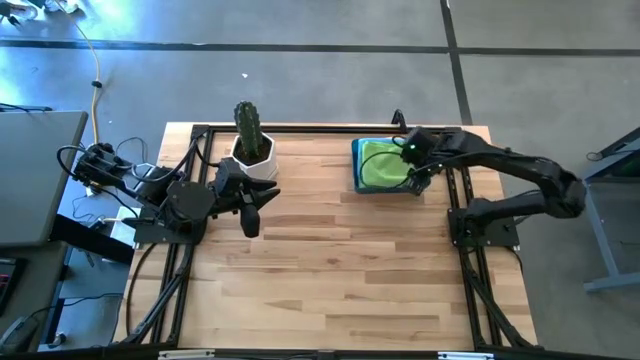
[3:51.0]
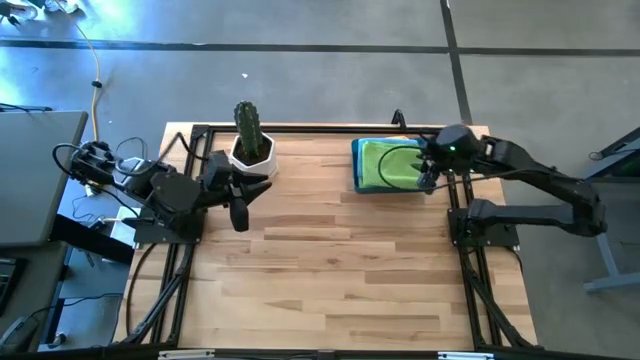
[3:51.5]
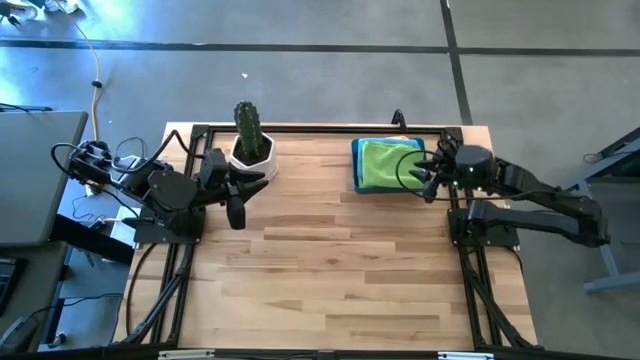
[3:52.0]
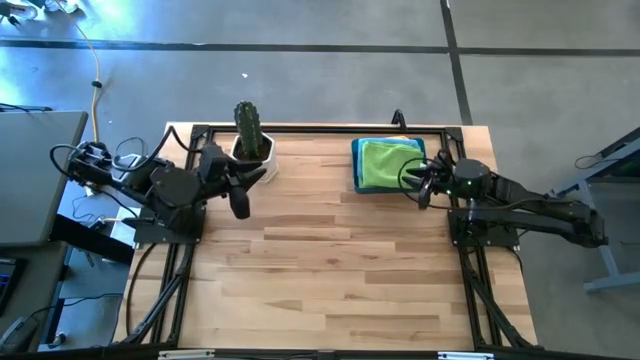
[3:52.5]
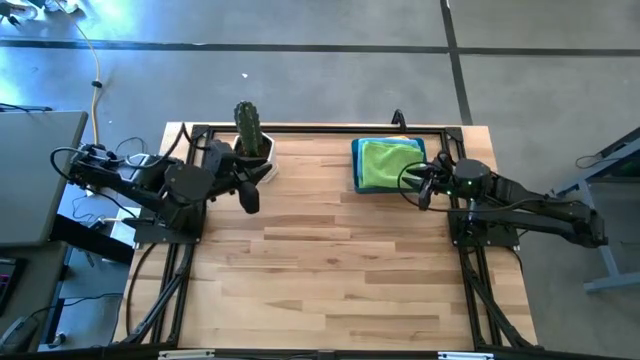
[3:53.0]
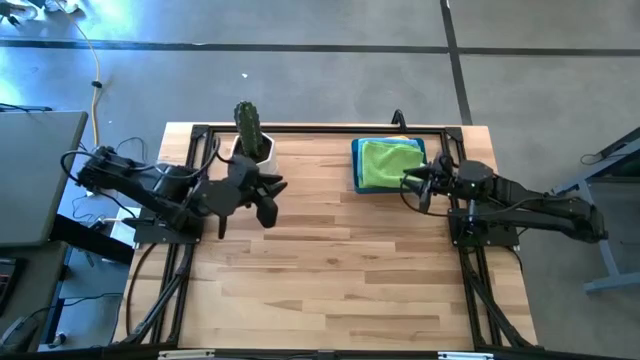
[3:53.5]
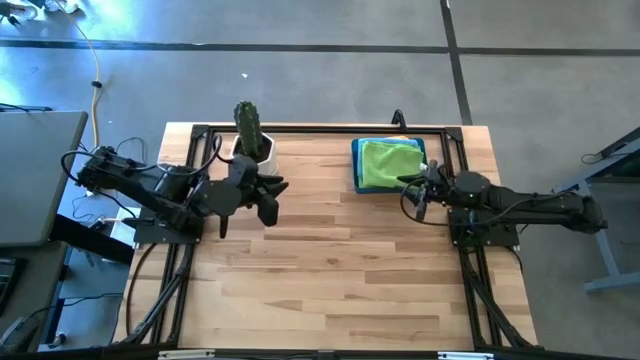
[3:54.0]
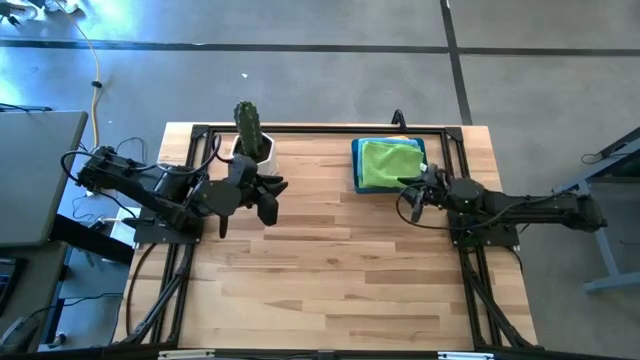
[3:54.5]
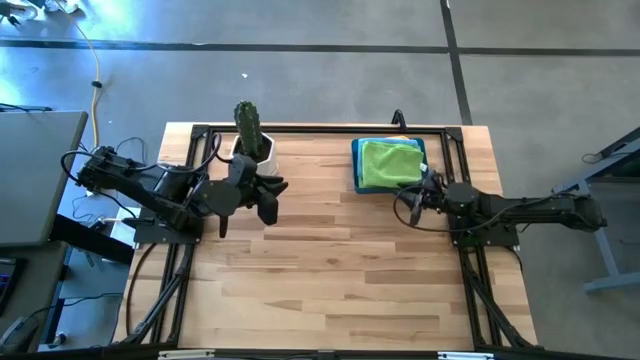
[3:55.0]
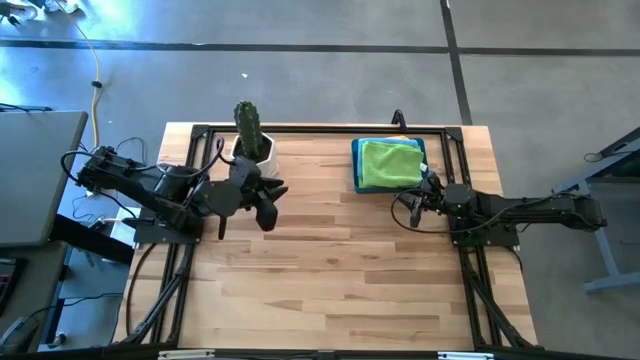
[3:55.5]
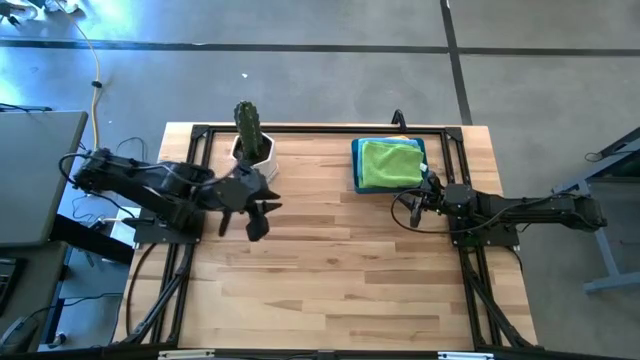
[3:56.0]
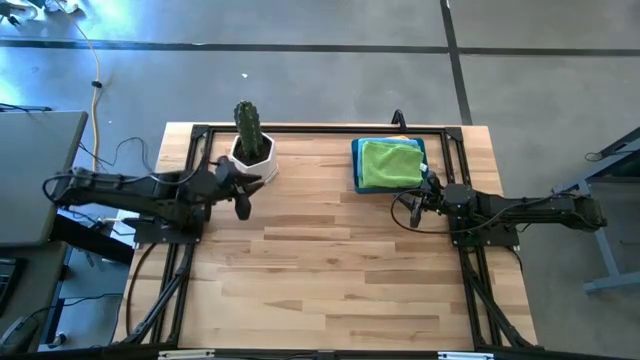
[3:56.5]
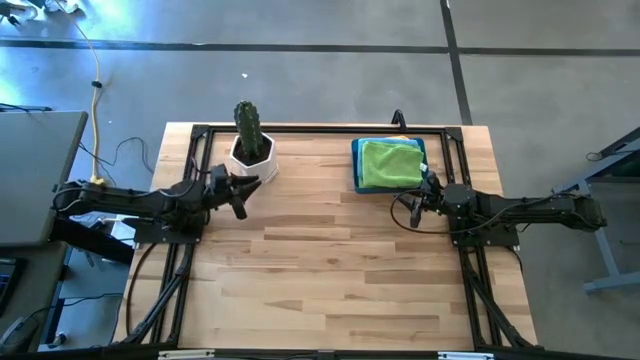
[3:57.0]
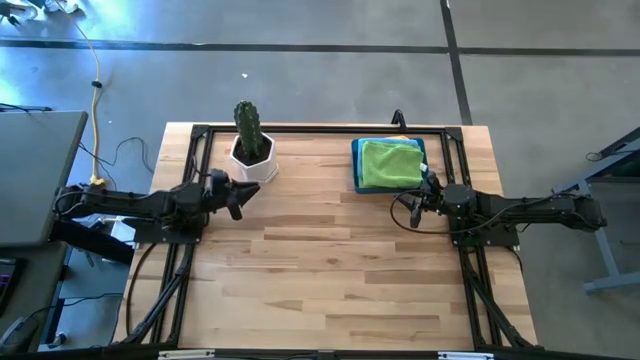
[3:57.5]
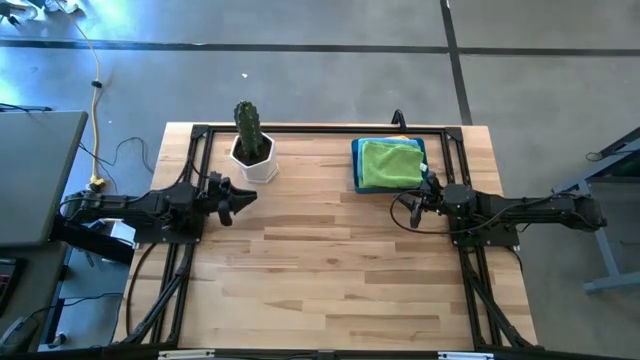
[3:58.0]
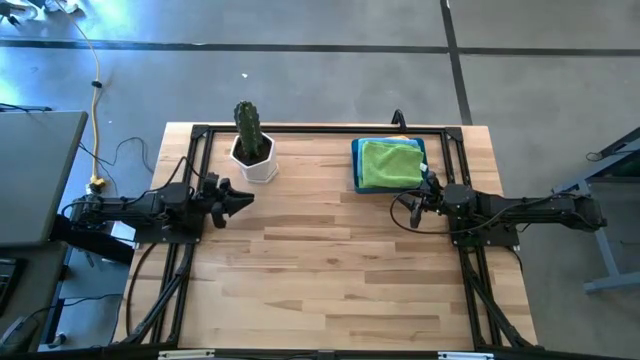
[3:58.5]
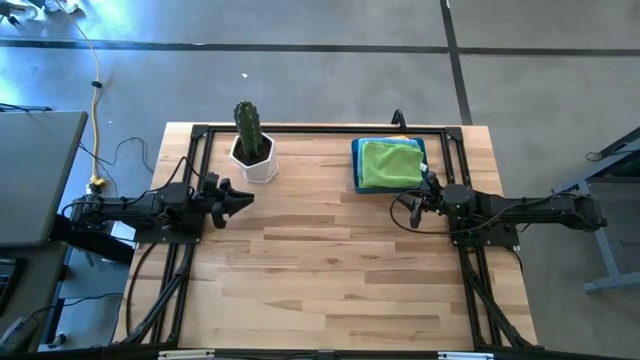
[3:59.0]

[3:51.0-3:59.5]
Task: Fold microfiber towels
Return to Home Position

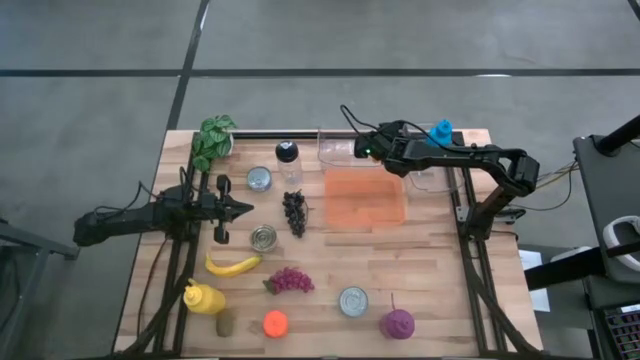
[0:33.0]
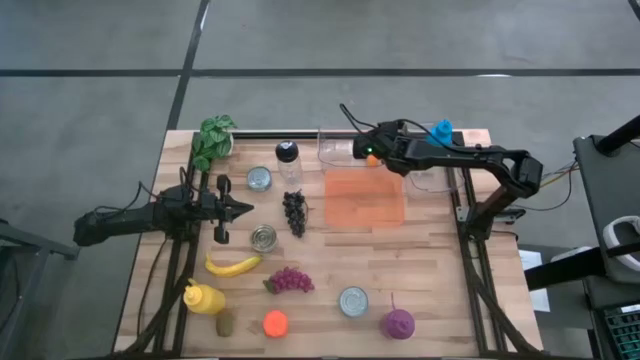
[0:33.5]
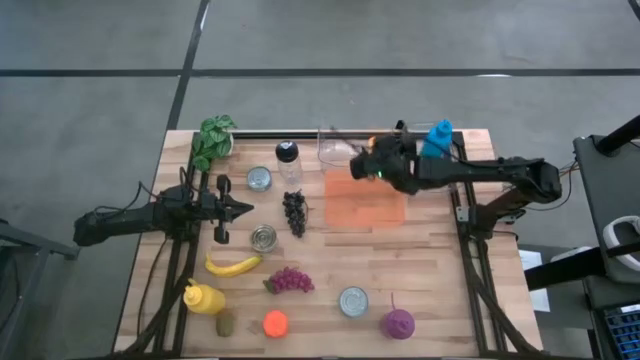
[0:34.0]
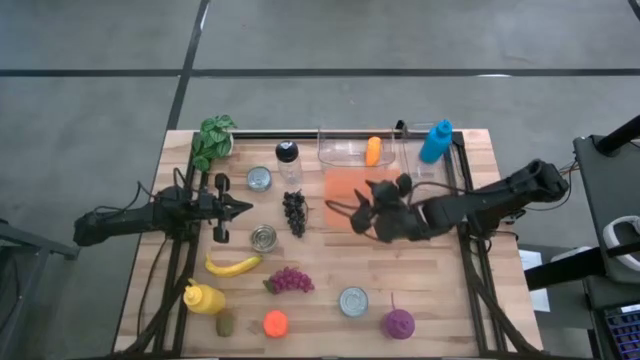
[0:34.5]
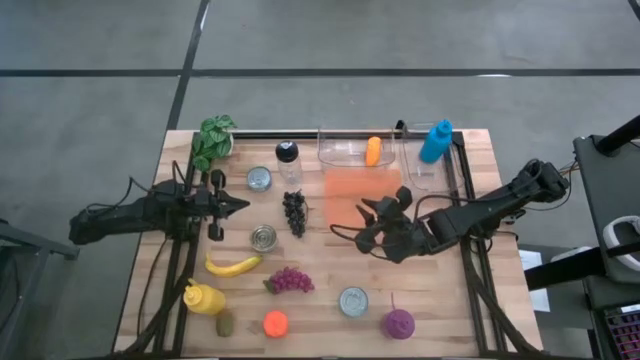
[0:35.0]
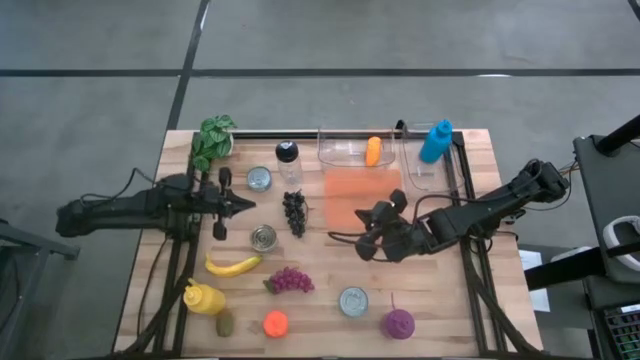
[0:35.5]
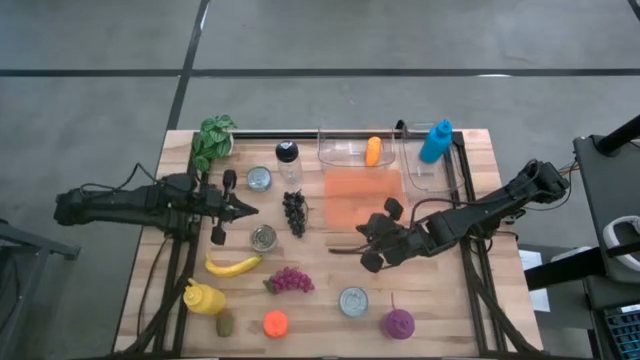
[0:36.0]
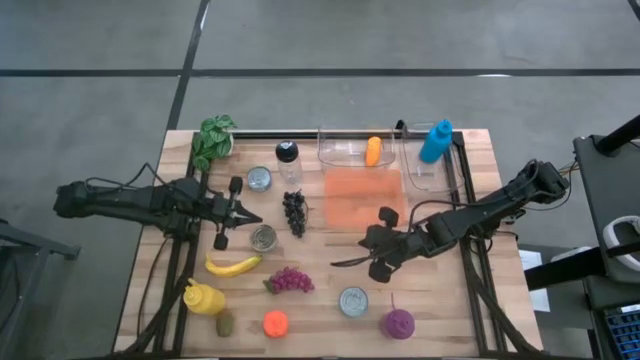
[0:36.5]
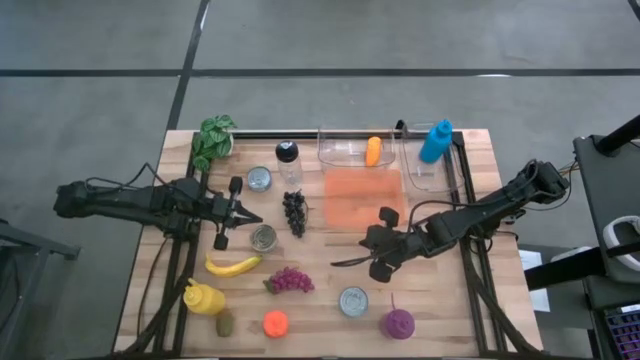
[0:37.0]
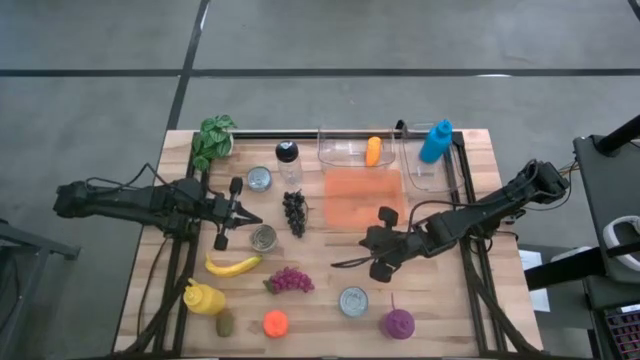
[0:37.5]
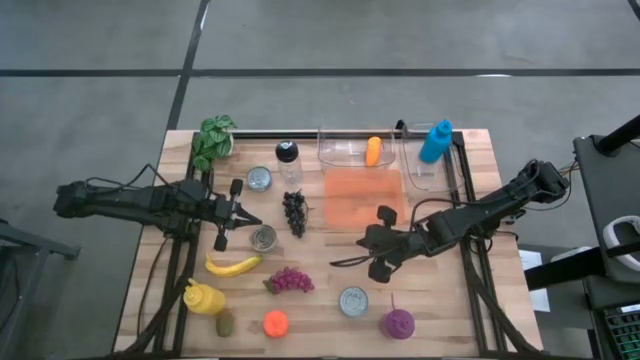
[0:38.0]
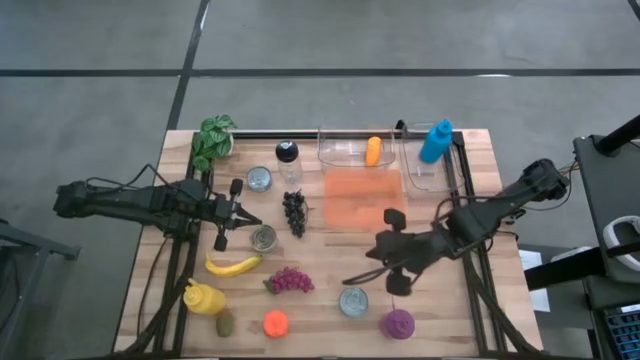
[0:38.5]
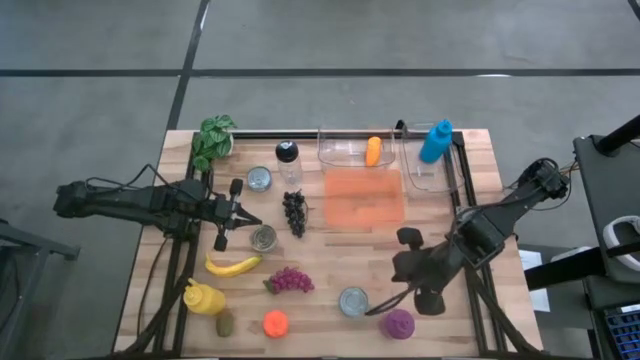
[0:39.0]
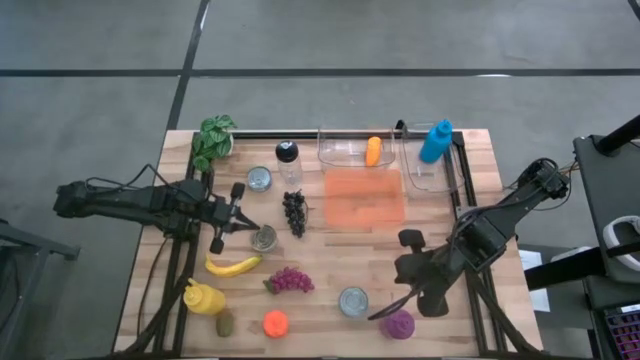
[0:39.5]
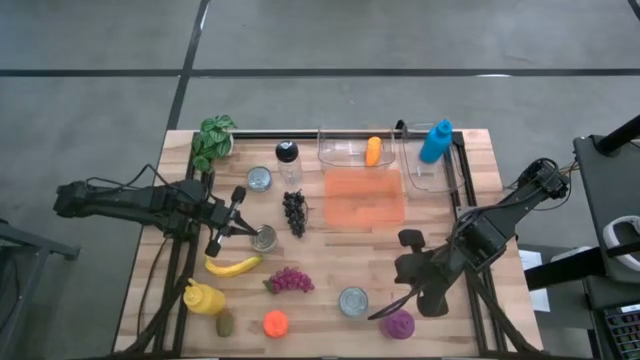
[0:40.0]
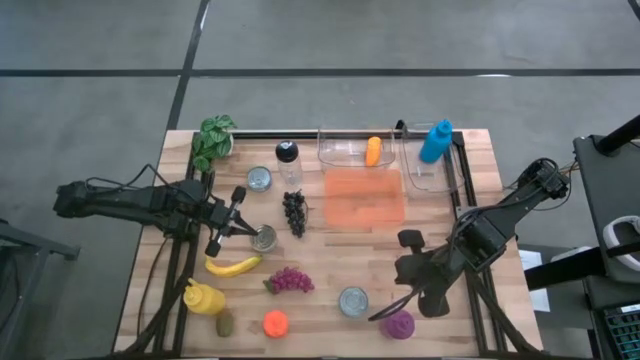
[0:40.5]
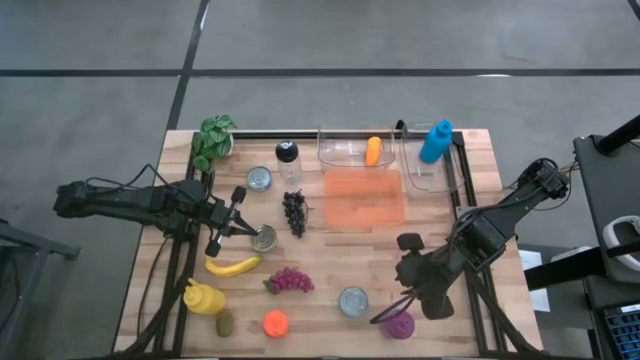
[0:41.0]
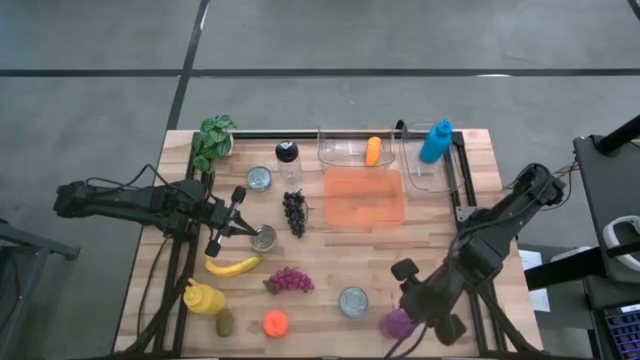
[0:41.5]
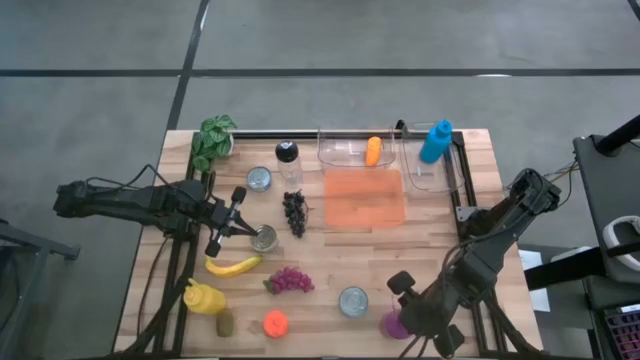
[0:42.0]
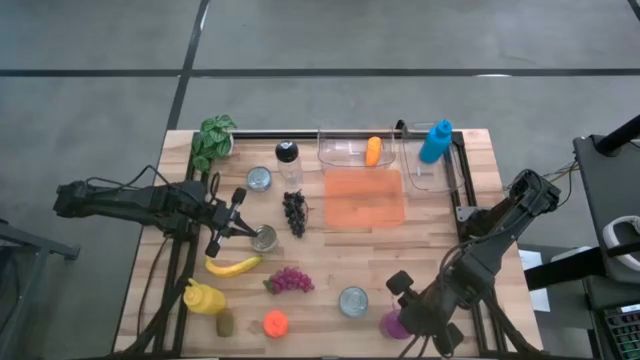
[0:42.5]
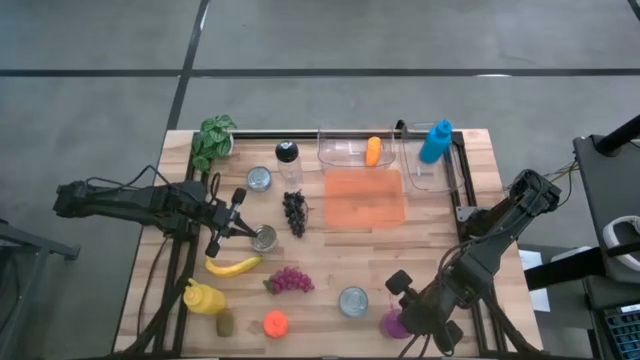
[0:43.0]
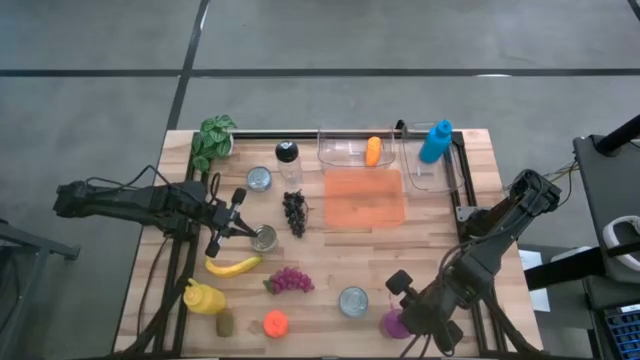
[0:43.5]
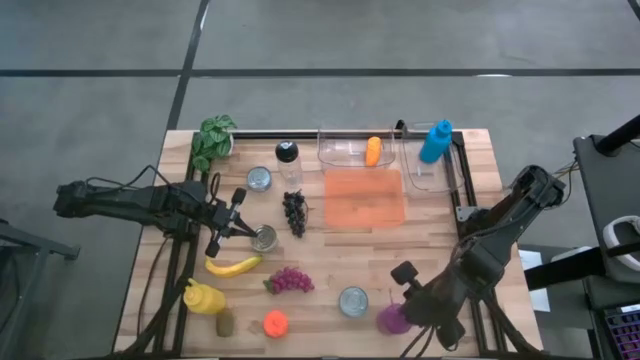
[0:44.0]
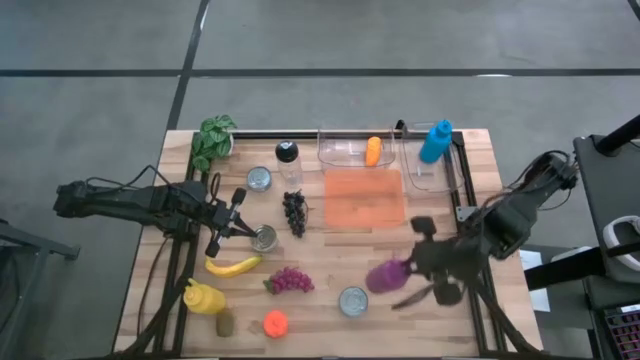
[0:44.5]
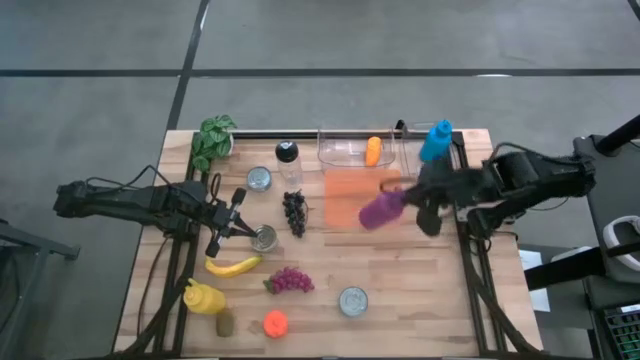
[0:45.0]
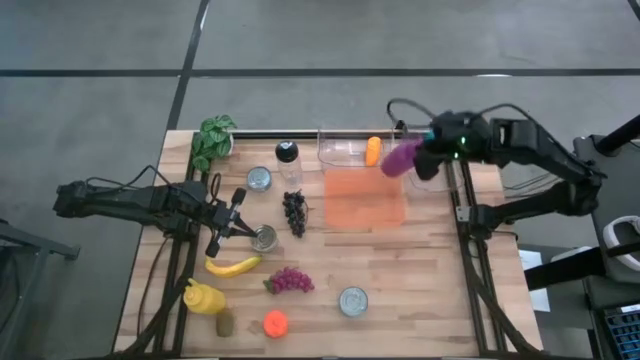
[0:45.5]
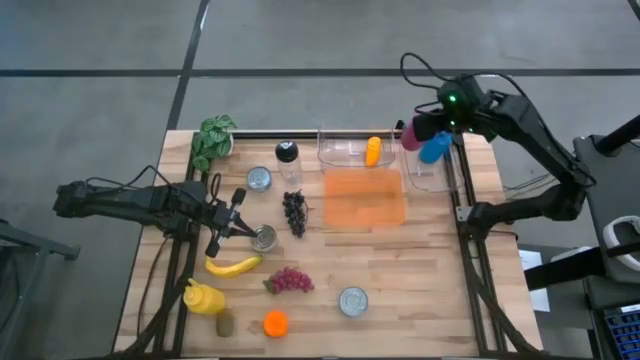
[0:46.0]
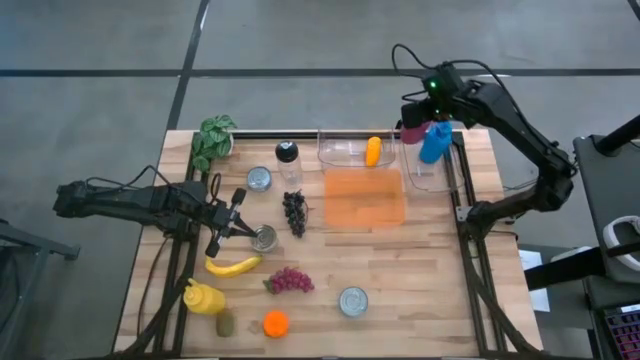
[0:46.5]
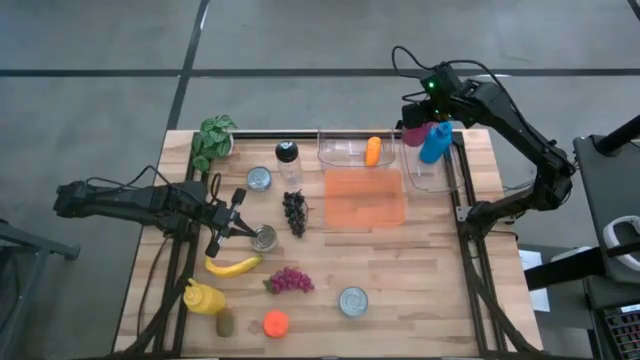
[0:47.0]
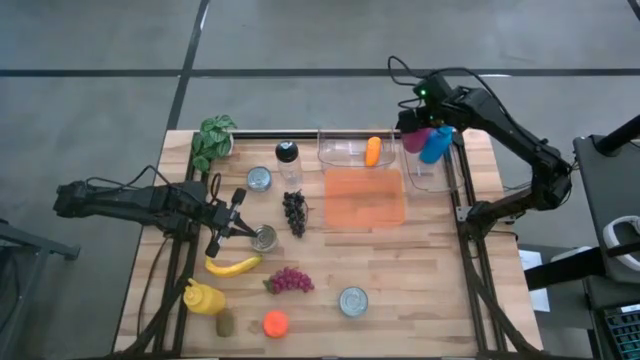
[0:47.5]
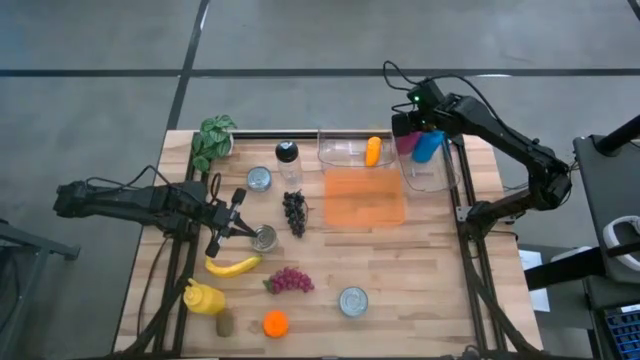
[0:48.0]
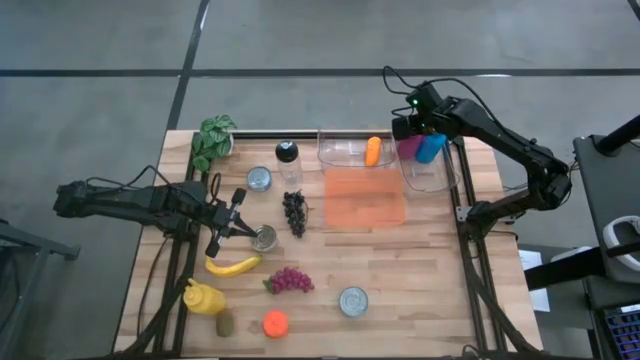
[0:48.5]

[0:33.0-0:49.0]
Task: Pick & Place Food Item
Put the purple water bottle into the right transparent bin
